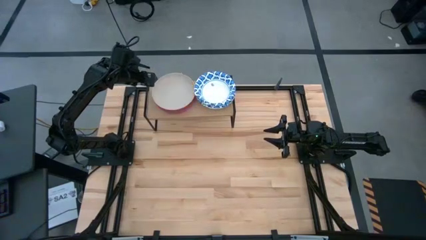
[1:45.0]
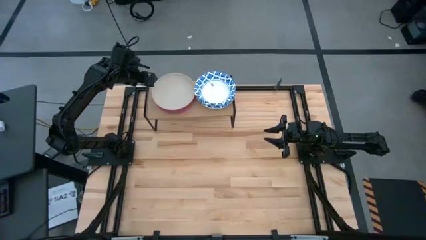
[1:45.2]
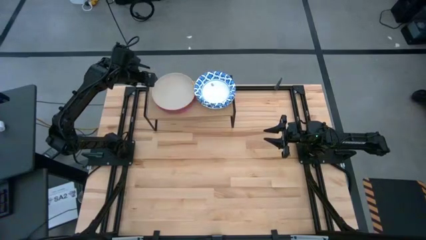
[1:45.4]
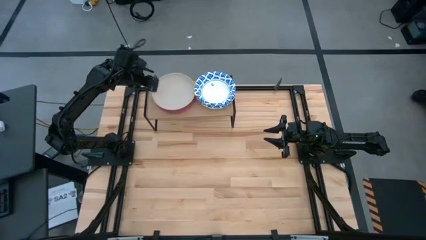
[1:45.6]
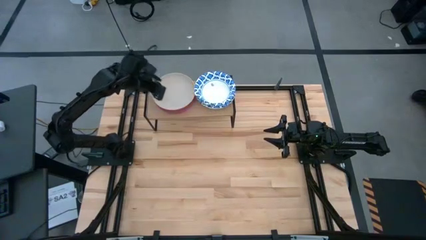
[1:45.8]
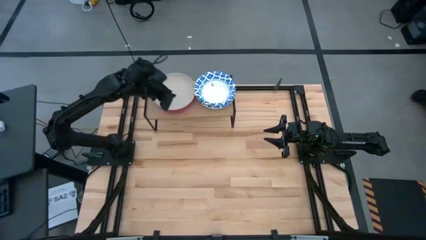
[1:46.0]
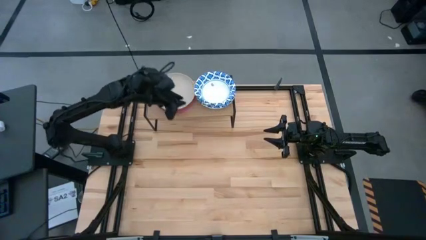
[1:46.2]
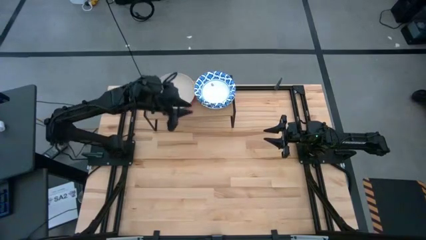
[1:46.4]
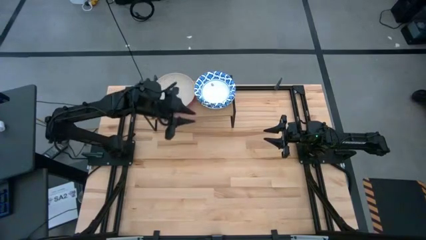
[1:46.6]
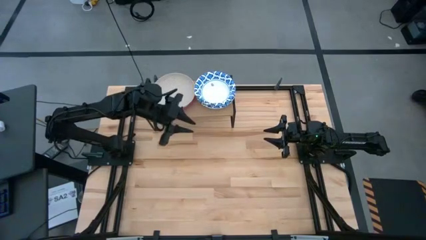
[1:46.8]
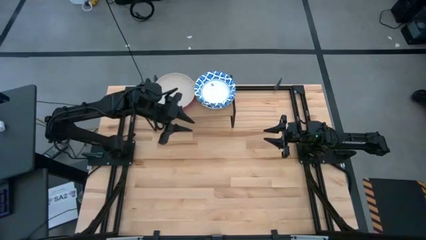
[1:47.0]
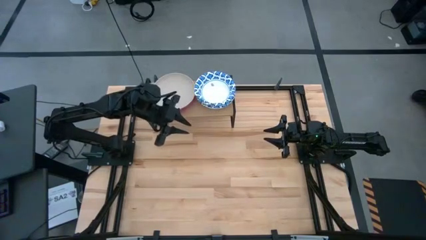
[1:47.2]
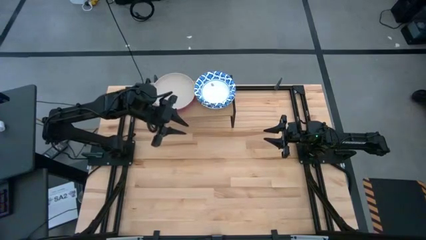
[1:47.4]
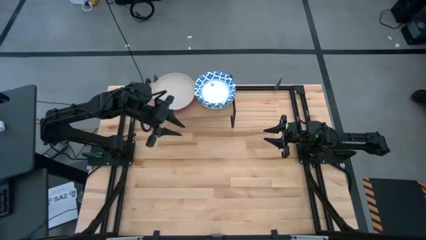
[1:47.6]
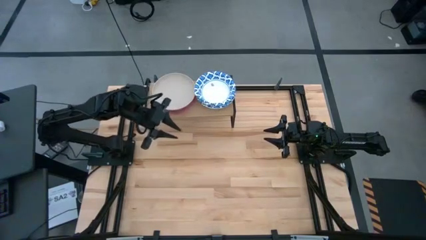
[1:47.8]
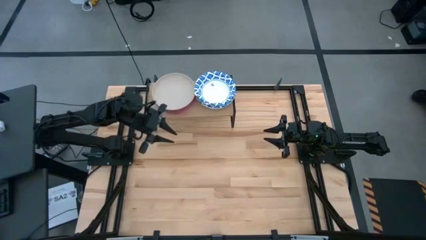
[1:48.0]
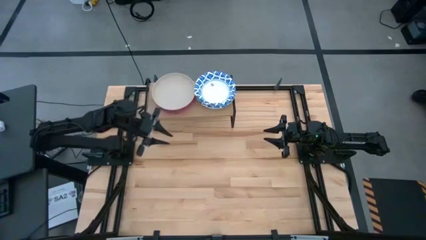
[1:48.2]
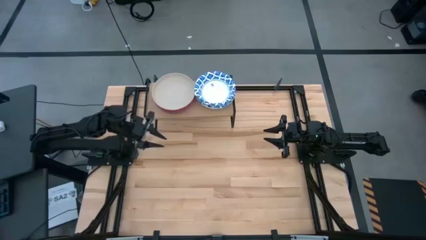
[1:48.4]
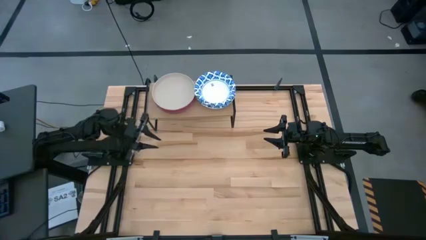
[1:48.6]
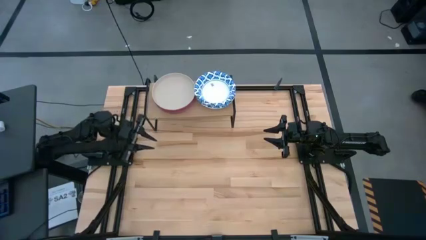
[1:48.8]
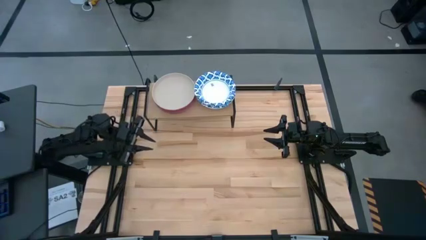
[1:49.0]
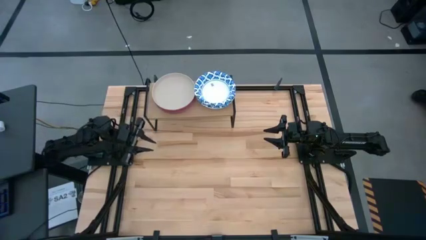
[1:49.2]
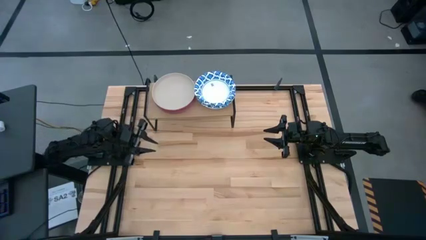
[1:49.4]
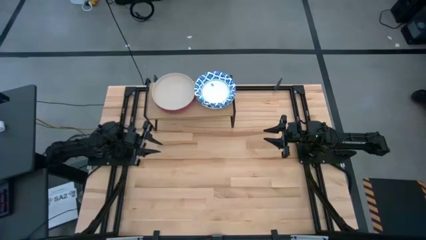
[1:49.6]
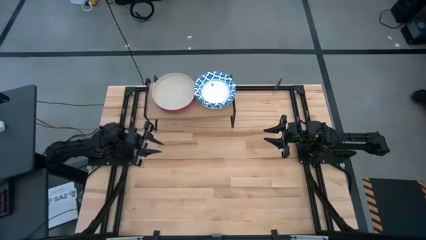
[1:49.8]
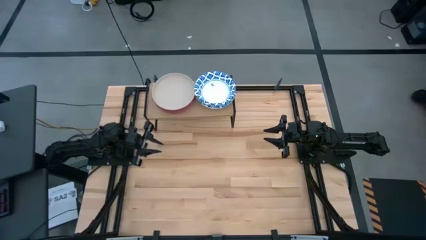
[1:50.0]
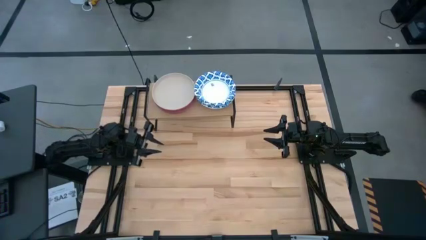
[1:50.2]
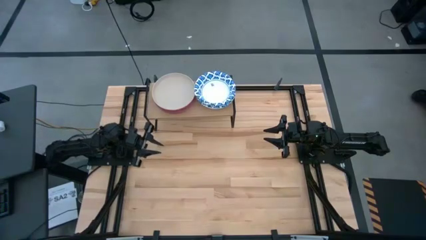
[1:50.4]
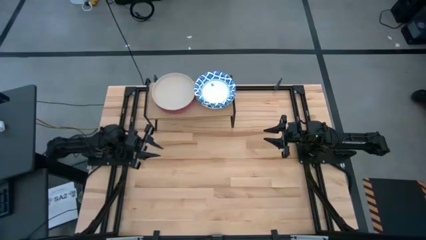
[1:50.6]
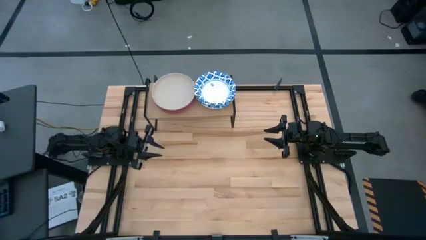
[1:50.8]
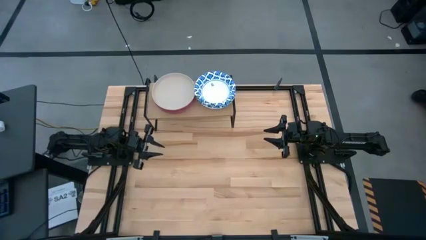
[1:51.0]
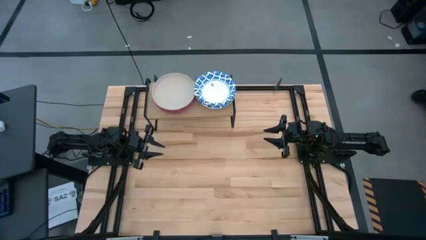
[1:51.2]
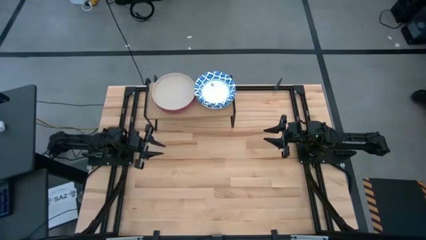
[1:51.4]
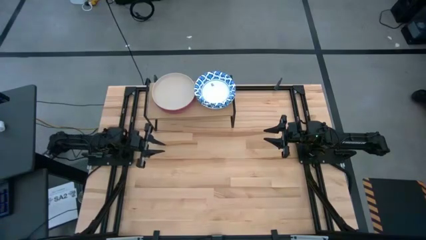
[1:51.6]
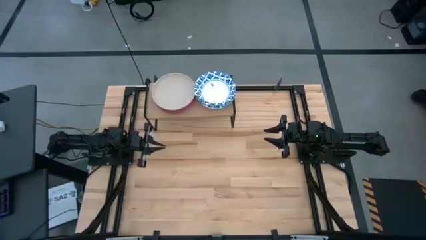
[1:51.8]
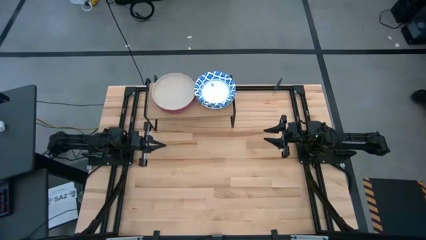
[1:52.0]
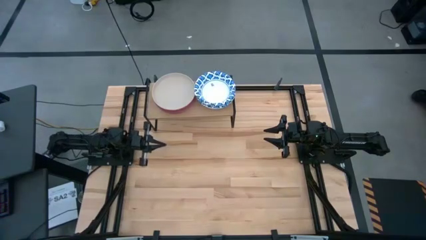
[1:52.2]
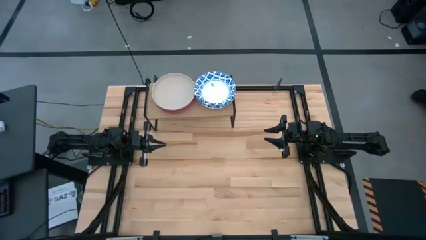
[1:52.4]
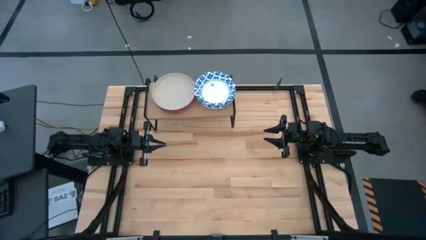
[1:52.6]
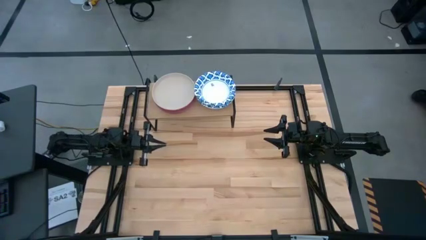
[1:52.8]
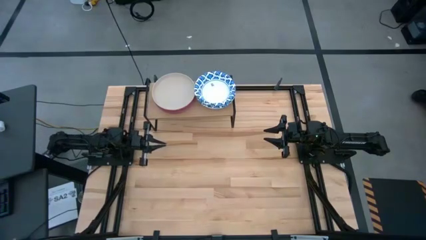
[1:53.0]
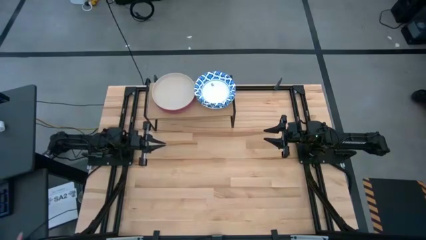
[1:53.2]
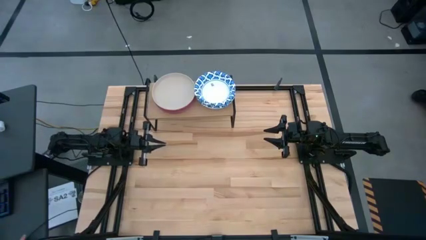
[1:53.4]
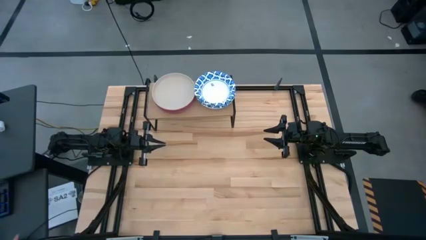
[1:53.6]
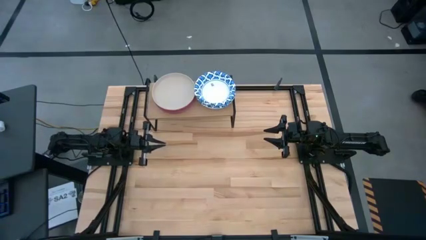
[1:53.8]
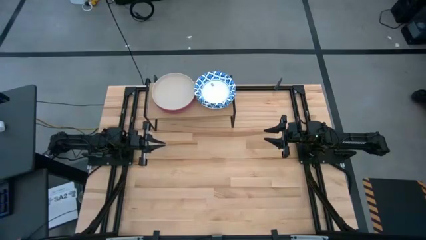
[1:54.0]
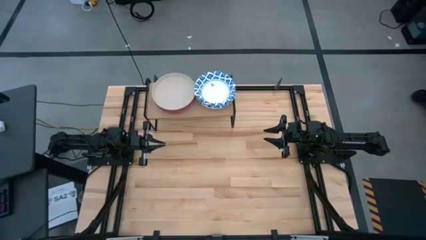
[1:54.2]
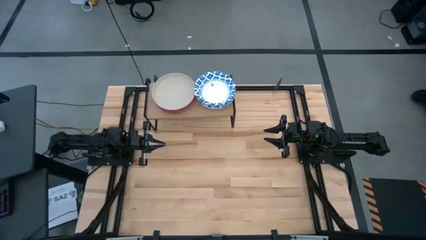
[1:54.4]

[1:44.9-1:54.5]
Task: Place and stack plates onto a shelf
Return to Home Position

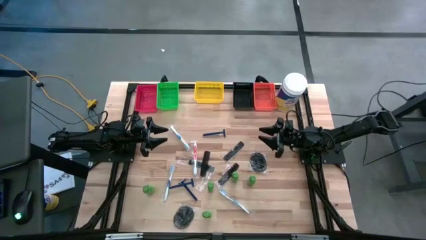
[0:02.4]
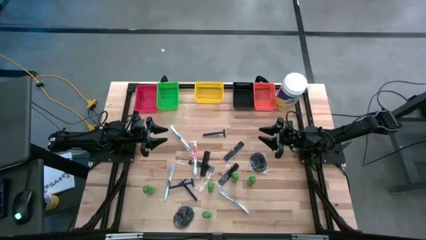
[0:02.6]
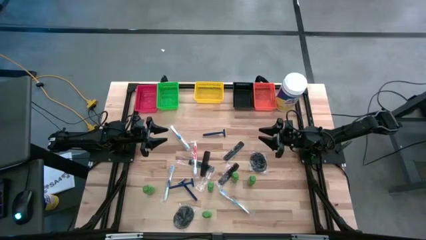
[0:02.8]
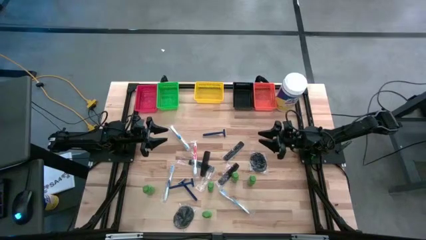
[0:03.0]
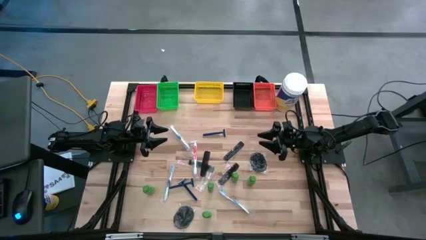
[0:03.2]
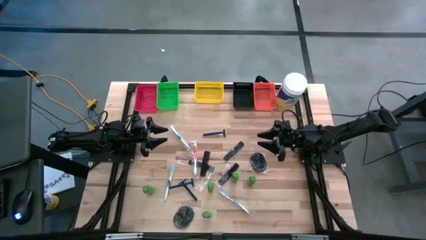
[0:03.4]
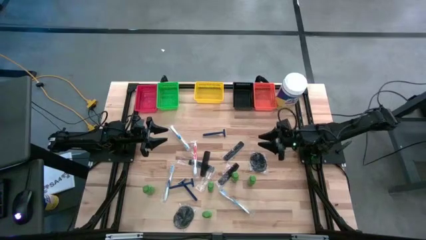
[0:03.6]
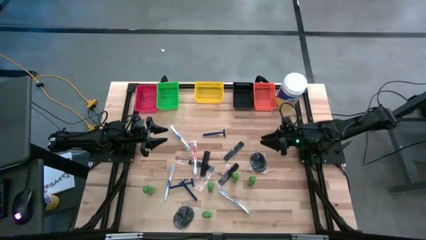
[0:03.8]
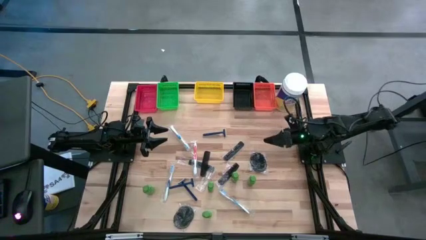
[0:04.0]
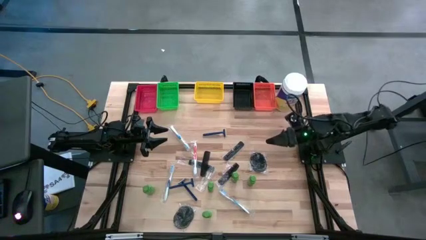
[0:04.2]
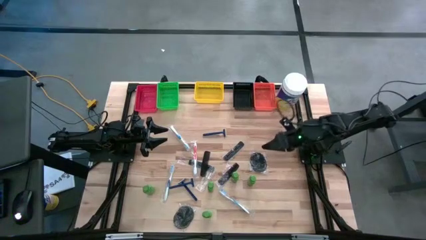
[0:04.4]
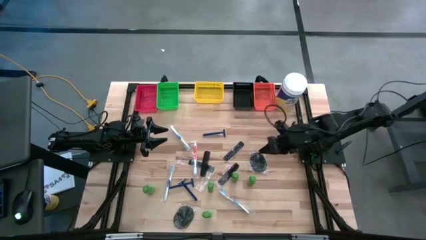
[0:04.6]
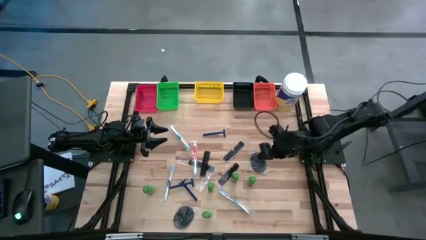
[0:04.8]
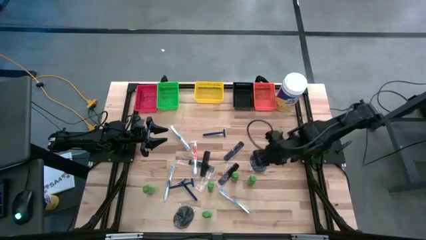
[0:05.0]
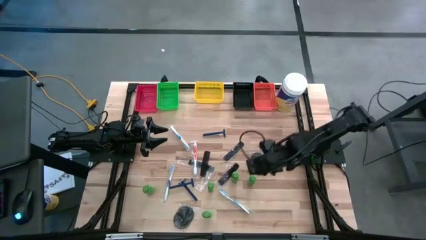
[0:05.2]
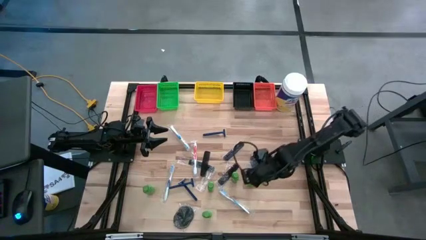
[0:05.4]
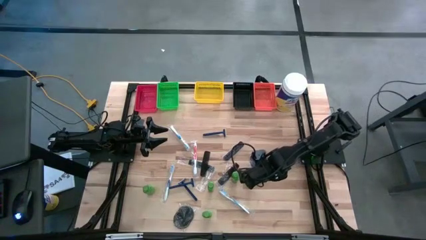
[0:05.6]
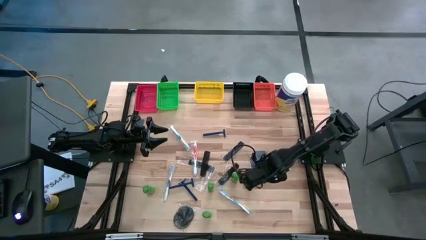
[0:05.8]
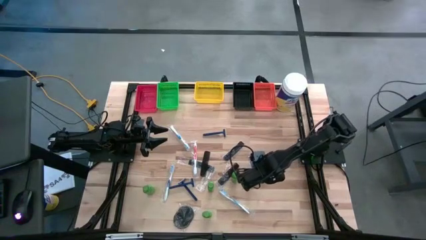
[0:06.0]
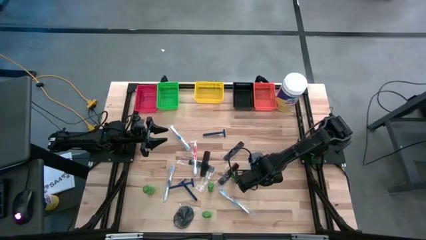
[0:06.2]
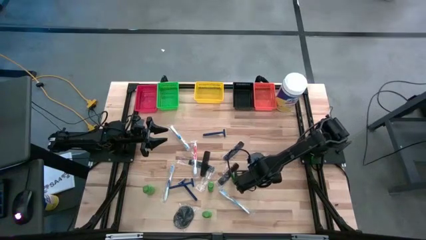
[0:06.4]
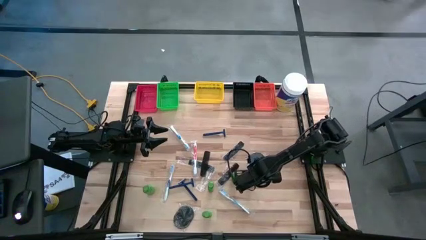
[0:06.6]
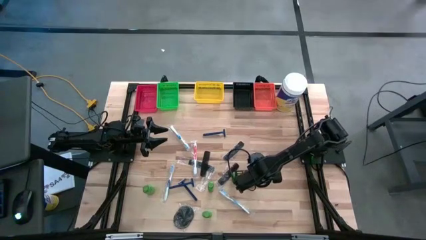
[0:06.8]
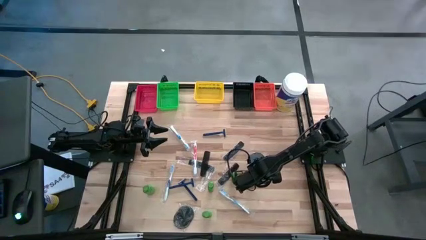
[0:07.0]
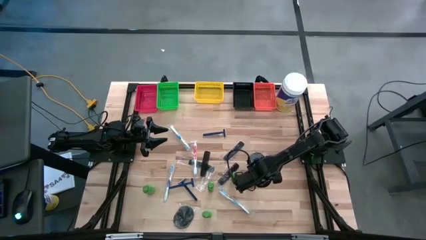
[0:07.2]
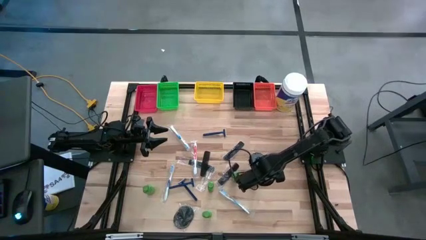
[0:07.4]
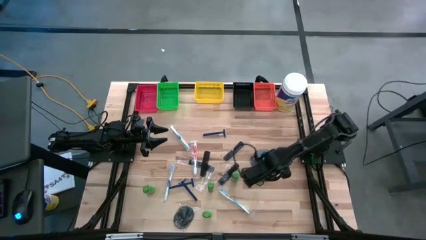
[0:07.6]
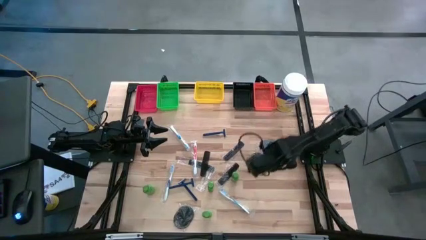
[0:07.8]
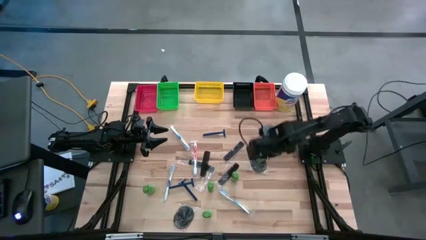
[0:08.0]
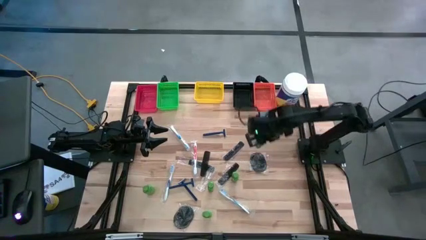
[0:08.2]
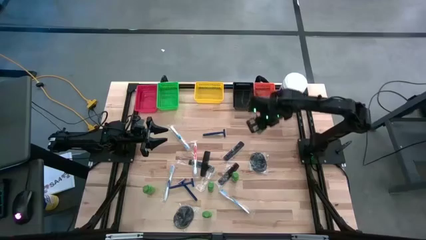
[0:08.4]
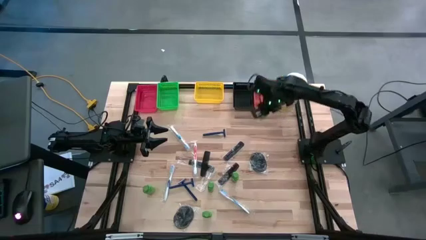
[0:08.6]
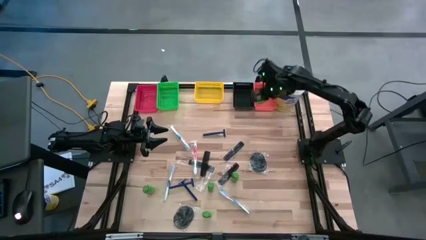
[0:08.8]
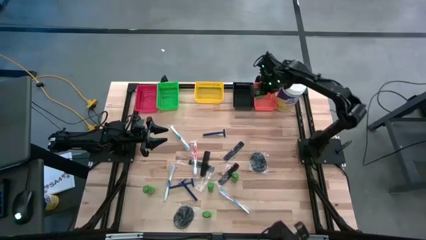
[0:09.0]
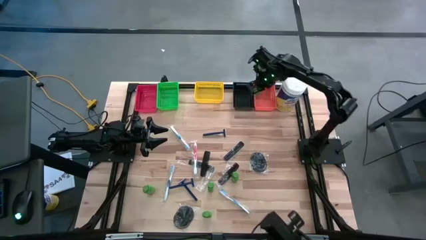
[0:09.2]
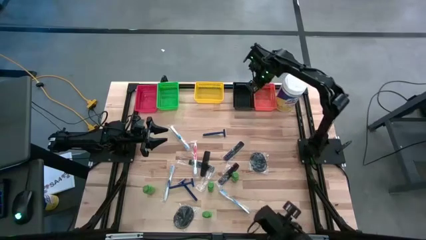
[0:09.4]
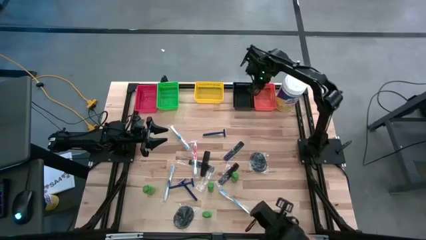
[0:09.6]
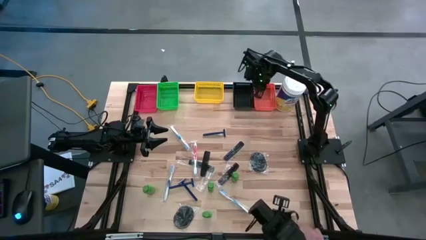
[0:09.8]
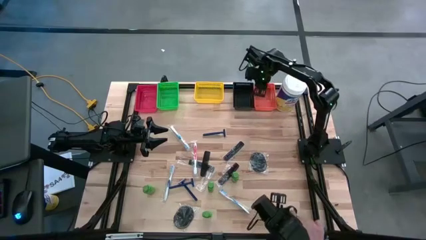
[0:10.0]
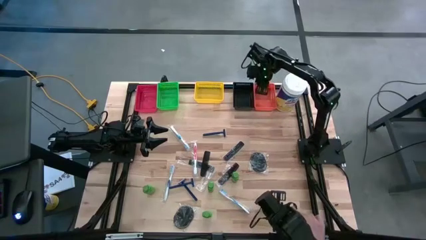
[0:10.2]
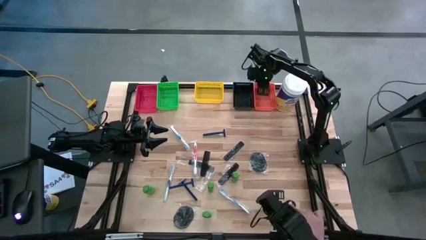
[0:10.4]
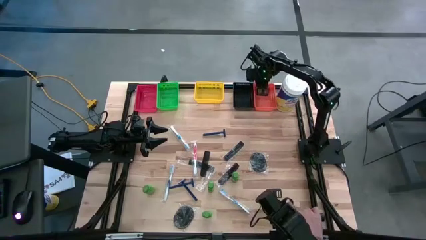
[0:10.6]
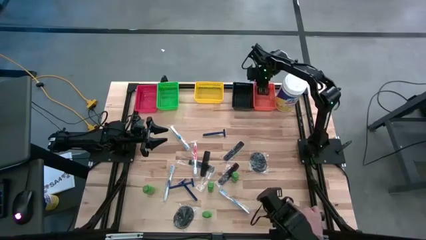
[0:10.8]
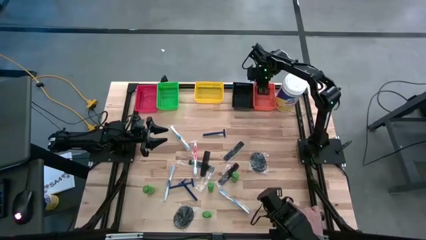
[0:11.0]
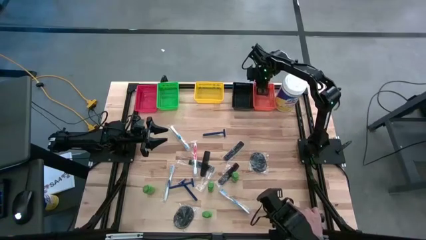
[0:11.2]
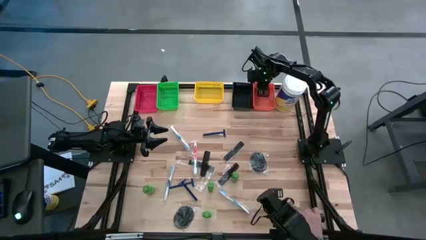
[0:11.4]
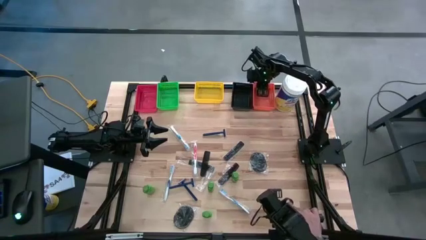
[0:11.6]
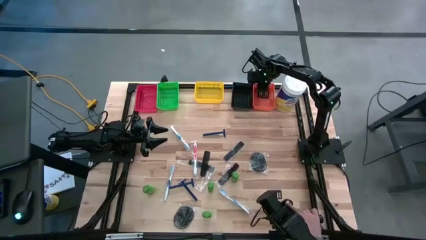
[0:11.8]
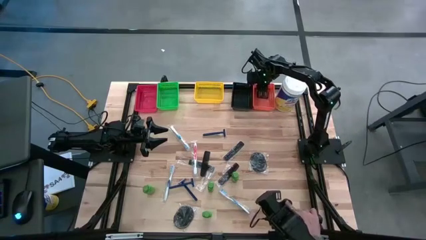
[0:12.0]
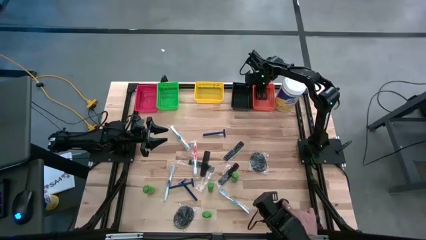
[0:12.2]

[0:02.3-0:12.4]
Task: Pick & Place Travel size toiletries
Put the green shampoo bottle into the orange bin
